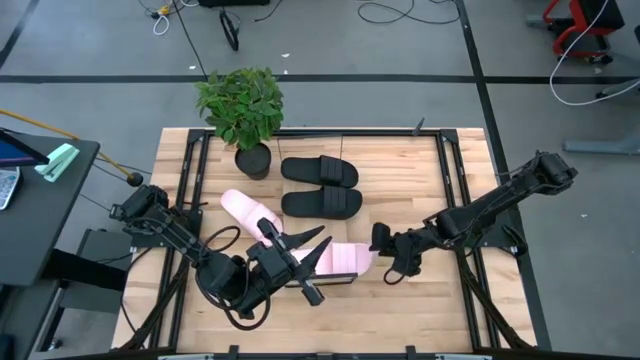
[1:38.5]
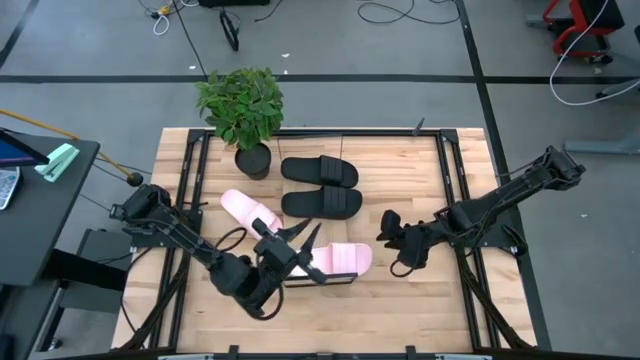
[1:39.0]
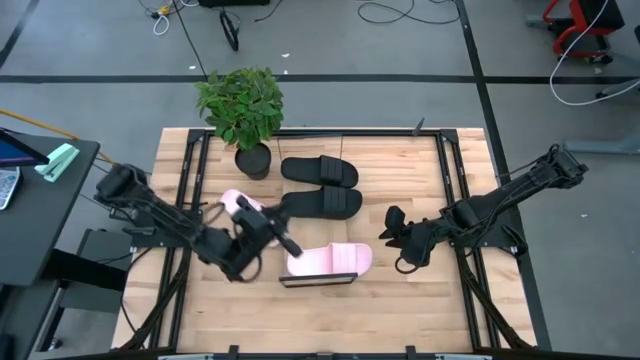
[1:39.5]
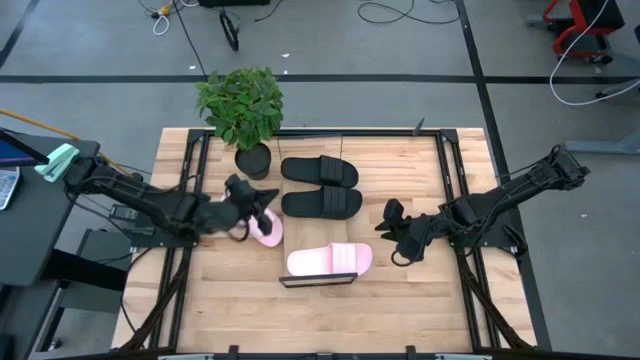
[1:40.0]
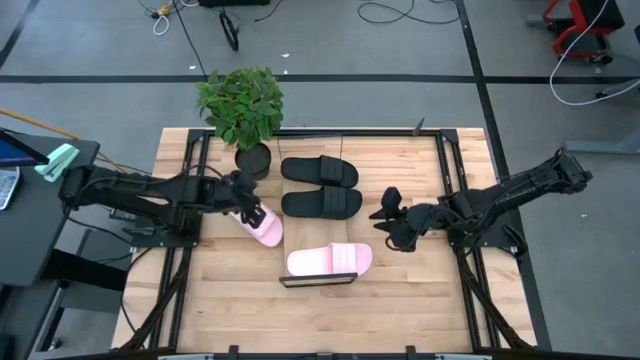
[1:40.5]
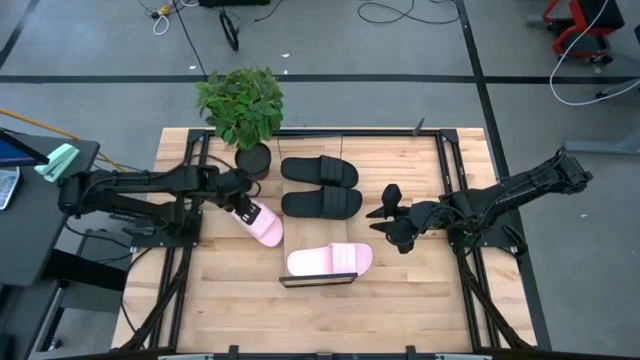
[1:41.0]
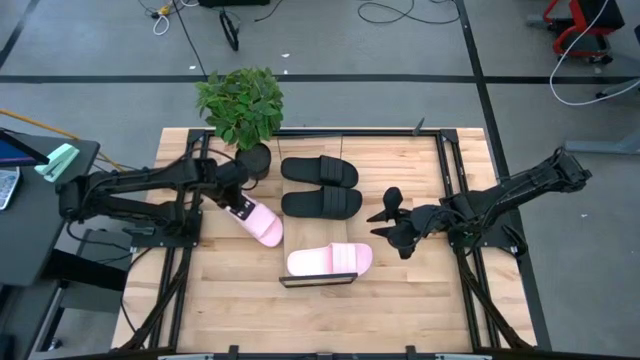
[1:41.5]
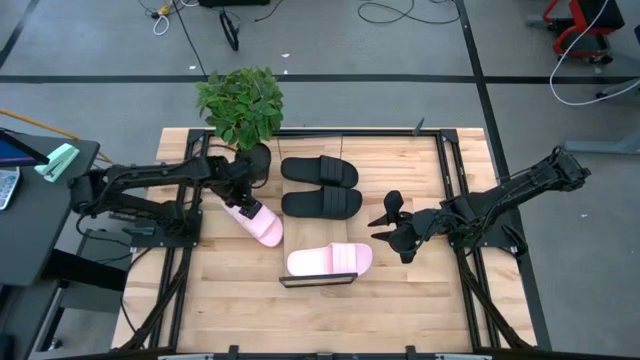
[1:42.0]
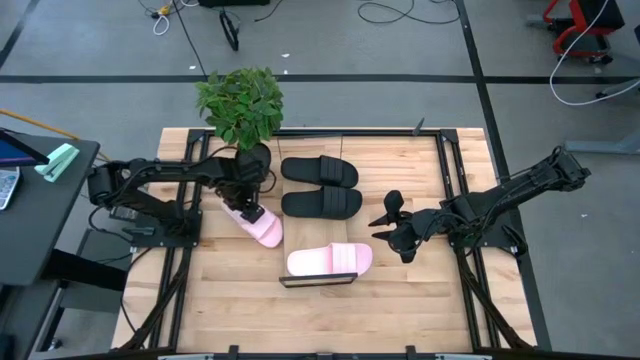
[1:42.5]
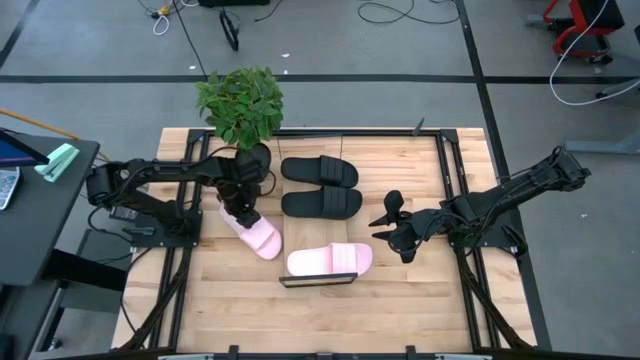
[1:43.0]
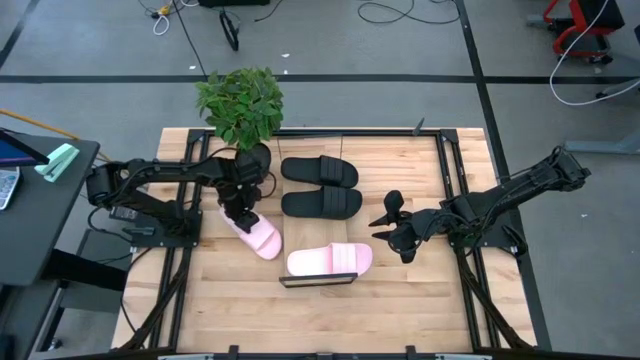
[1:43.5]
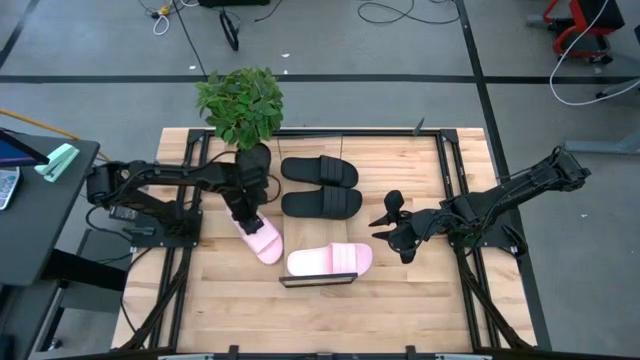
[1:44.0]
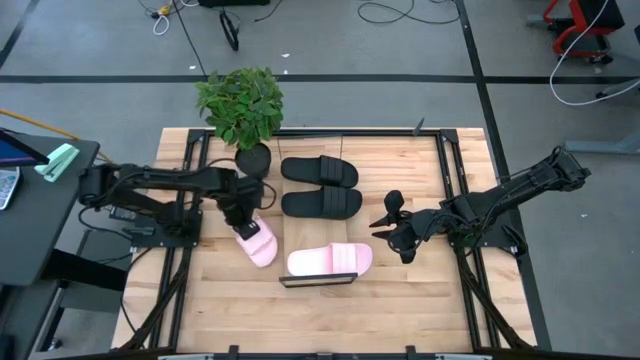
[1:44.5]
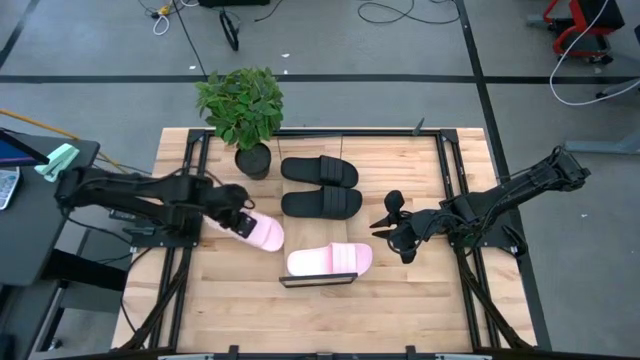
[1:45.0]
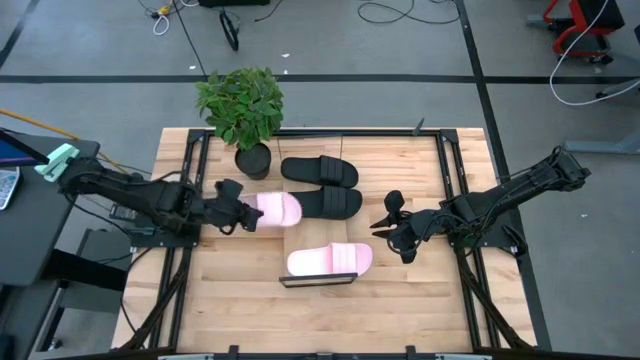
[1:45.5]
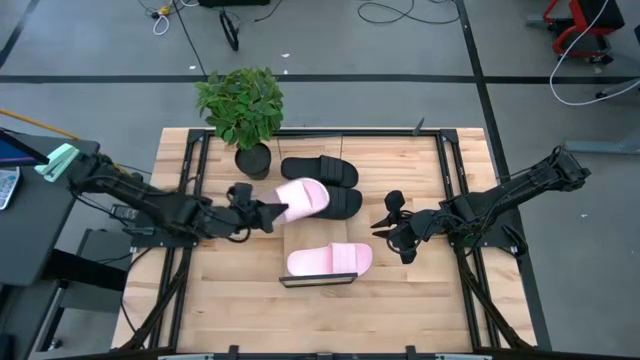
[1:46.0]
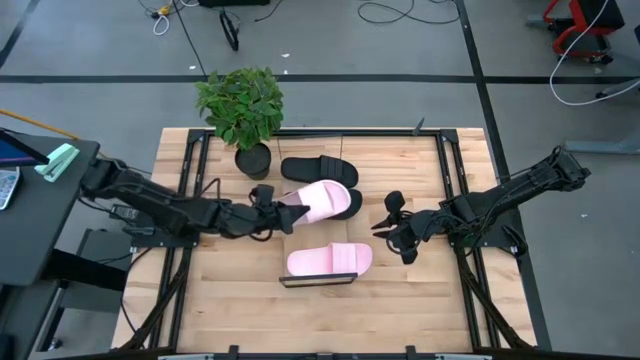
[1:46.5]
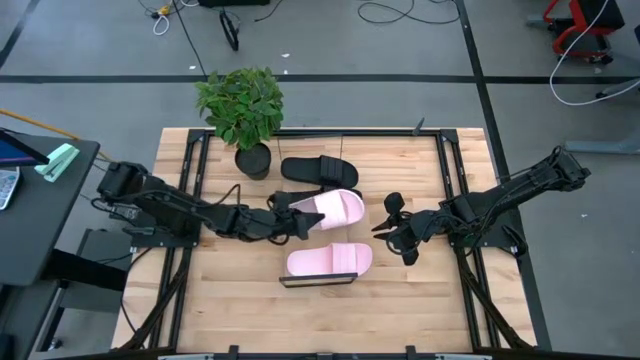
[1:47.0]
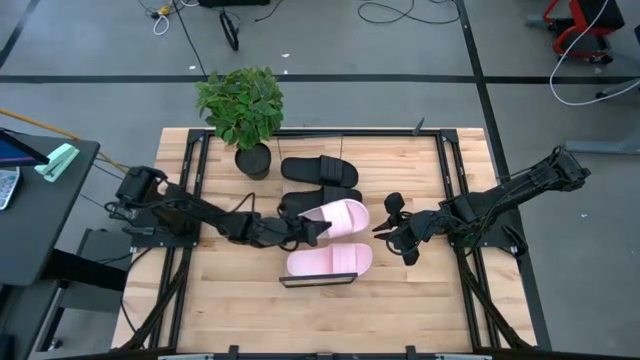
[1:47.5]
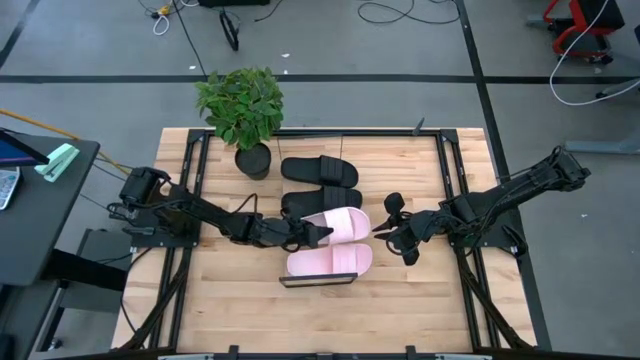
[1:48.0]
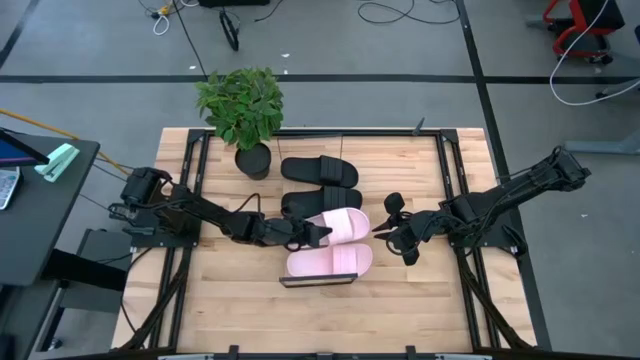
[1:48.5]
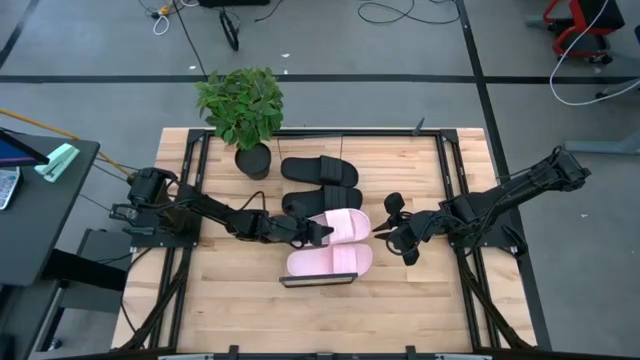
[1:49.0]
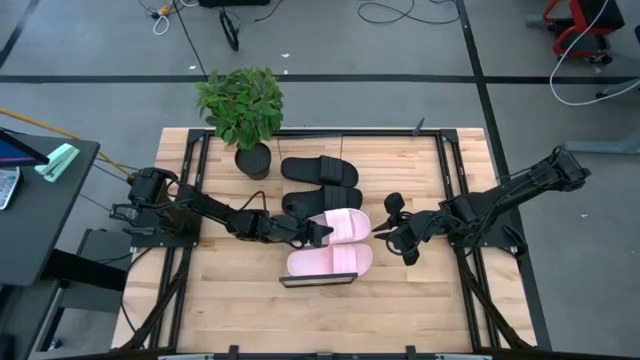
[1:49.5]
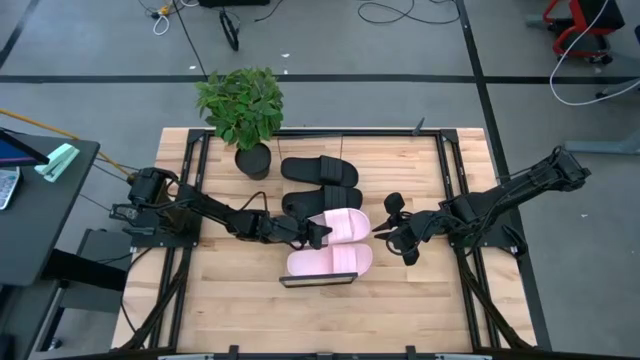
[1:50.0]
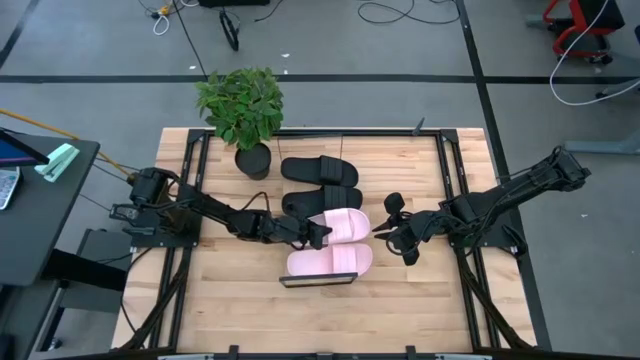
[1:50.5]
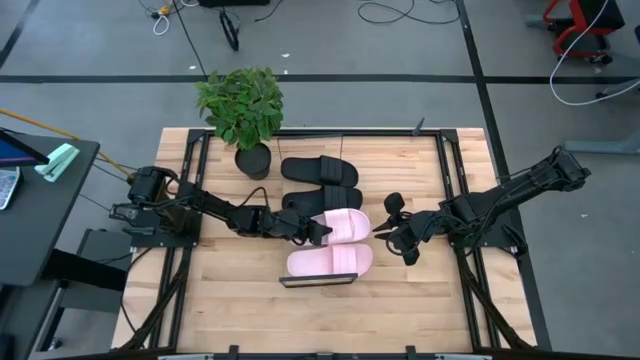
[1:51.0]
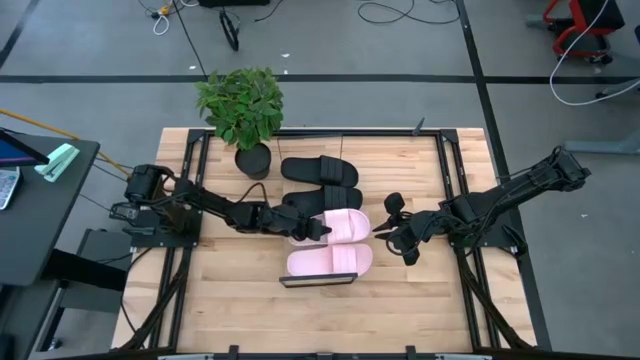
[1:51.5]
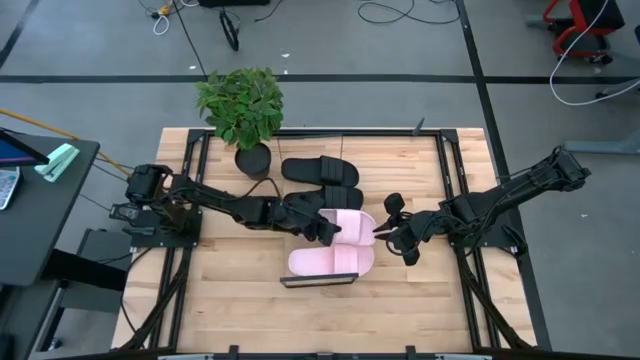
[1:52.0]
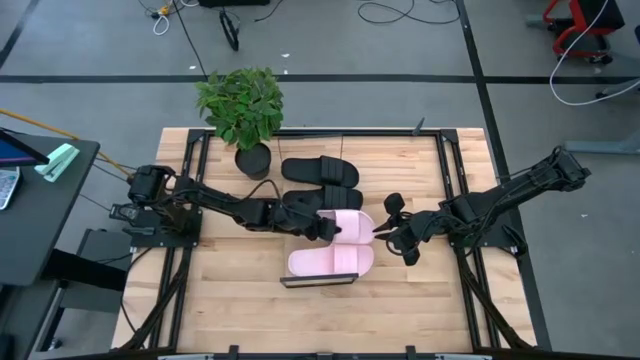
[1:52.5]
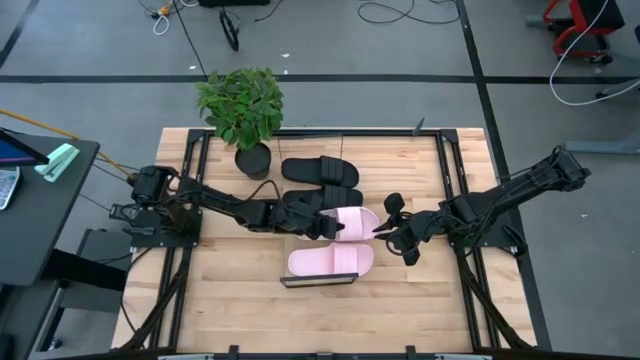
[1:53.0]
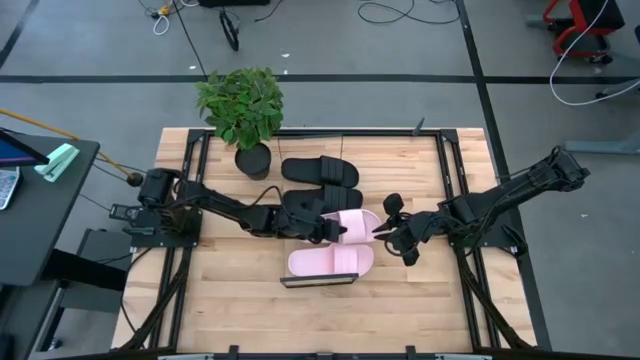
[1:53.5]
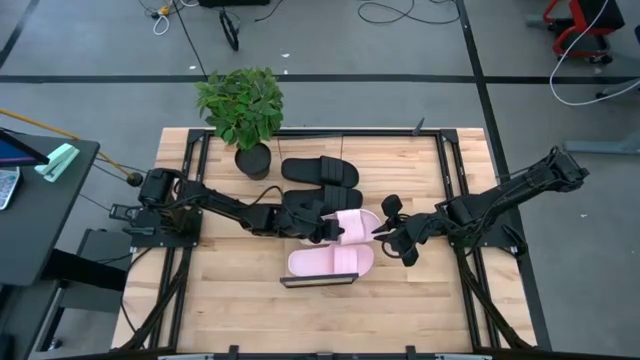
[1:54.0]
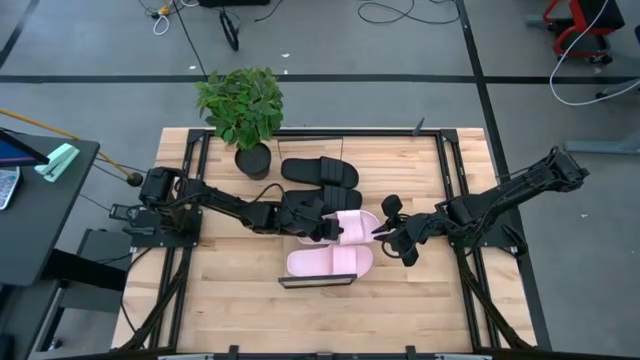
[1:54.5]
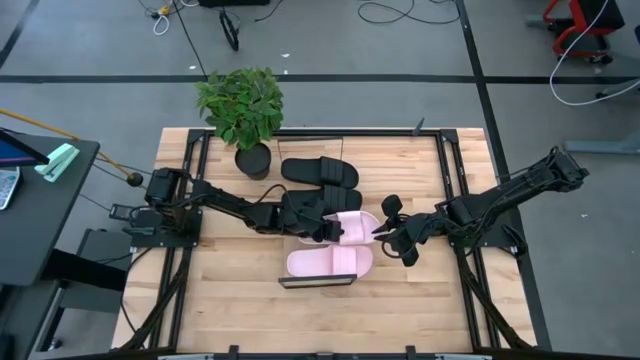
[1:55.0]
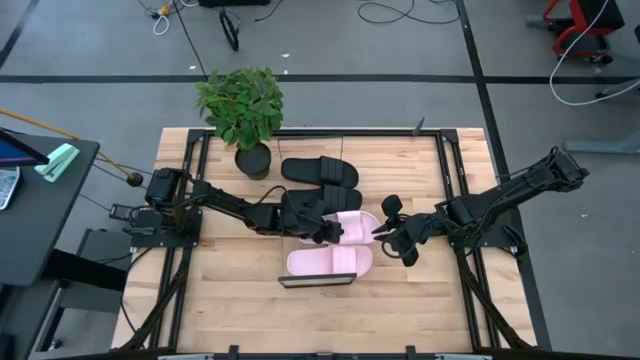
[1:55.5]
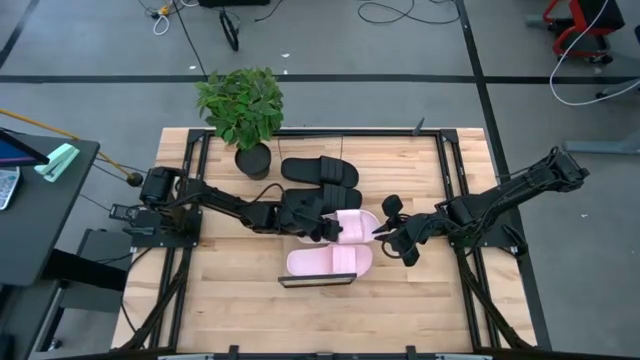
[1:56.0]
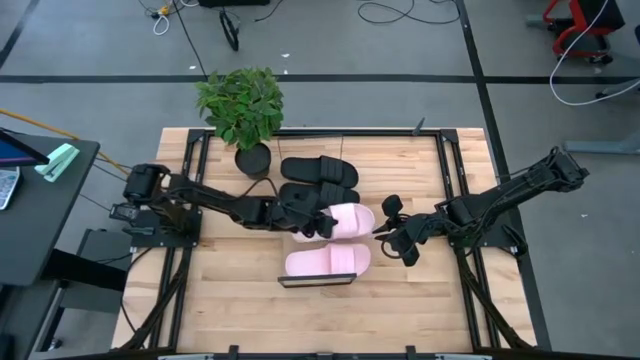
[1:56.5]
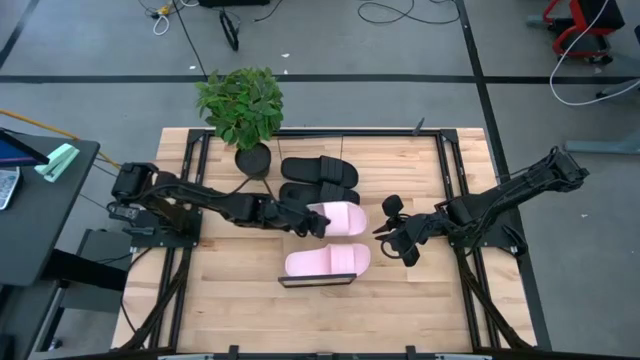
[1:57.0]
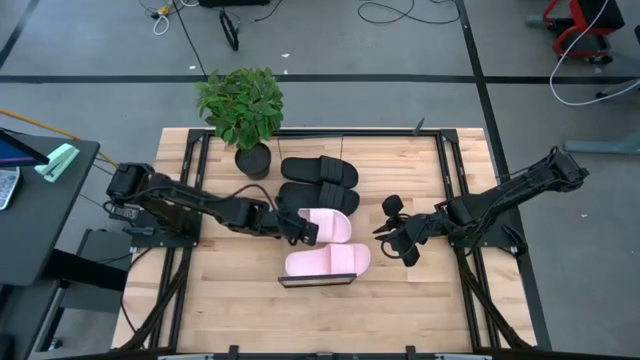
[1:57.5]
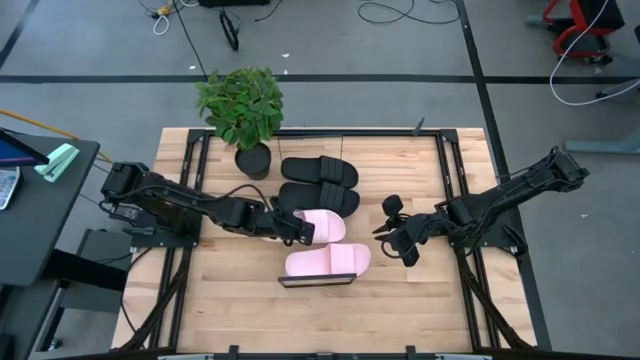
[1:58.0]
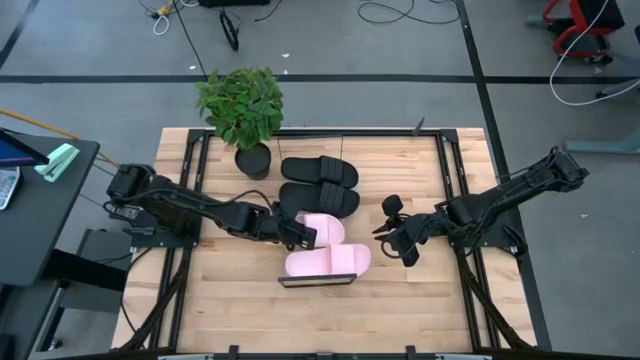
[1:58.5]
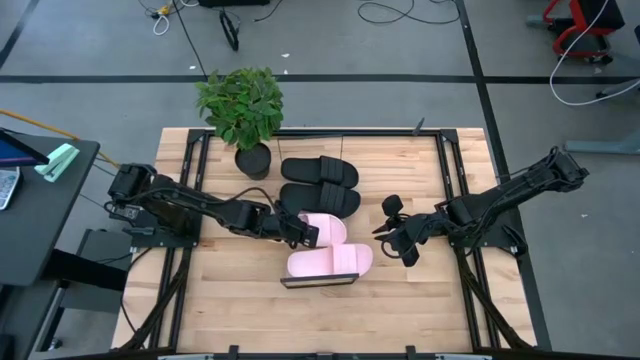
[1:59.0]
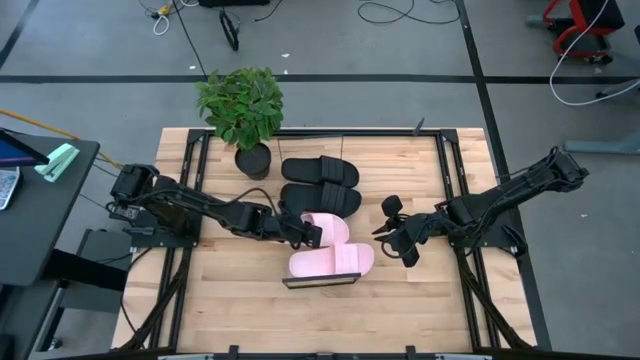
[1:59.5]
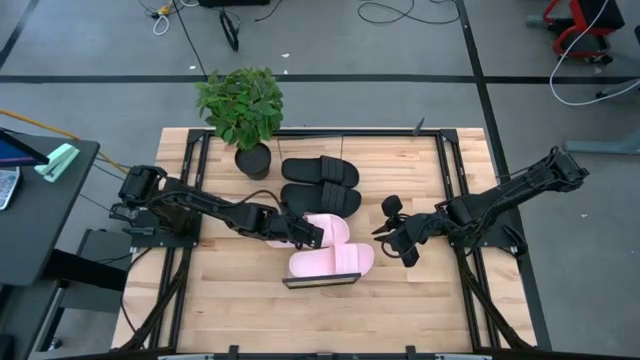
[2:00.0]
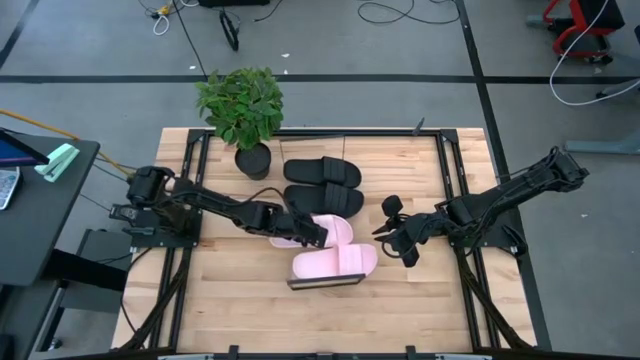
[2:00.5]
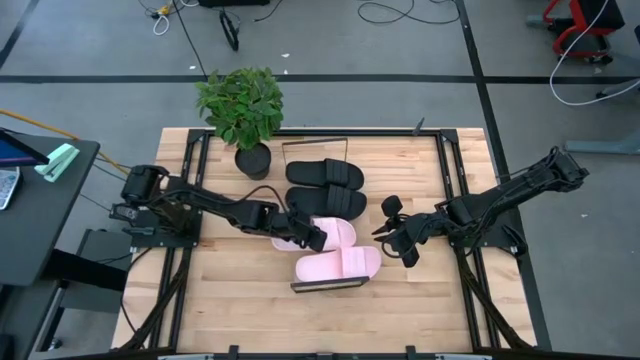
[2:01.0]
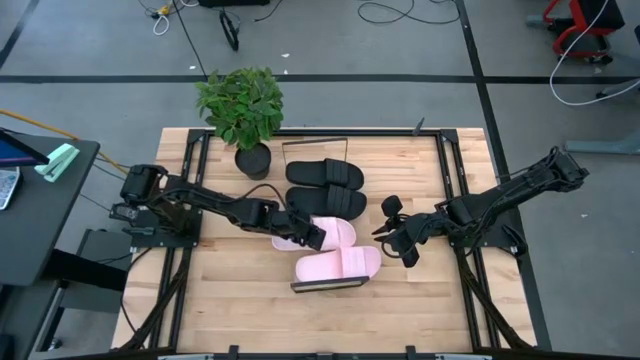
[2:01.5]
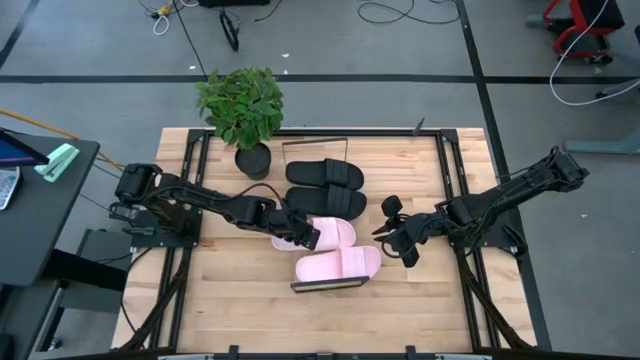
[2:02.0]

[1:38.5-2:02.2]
Task: Pick and place slides into the shelf
Put the pink slipper on the shelf
